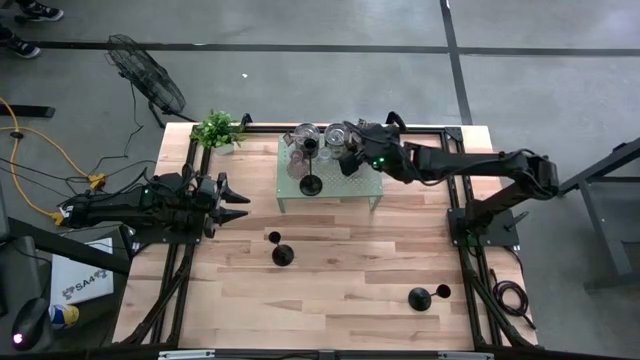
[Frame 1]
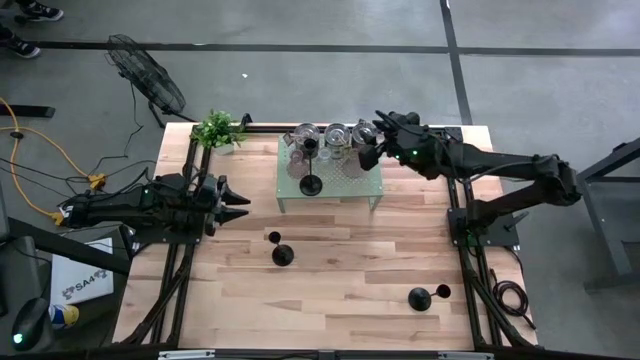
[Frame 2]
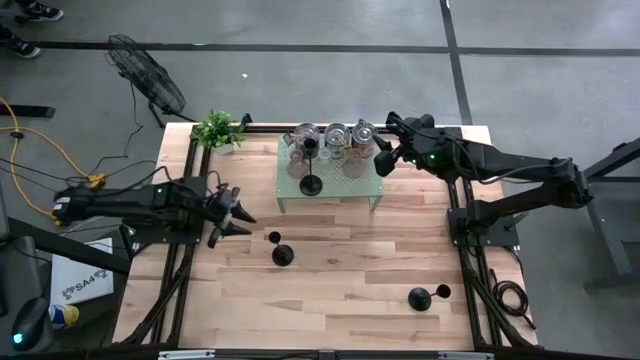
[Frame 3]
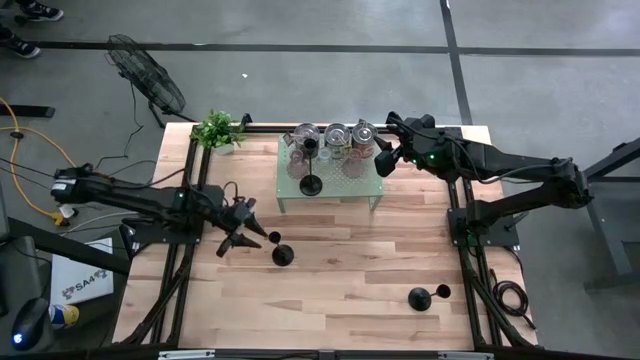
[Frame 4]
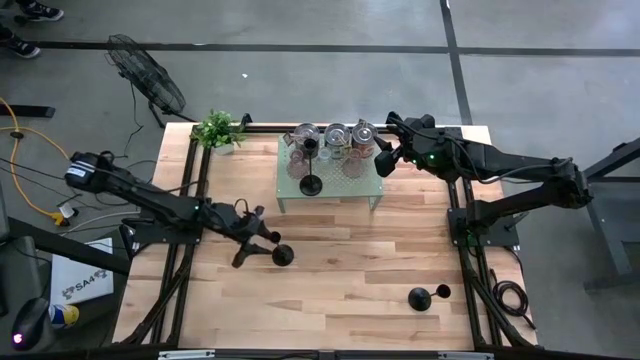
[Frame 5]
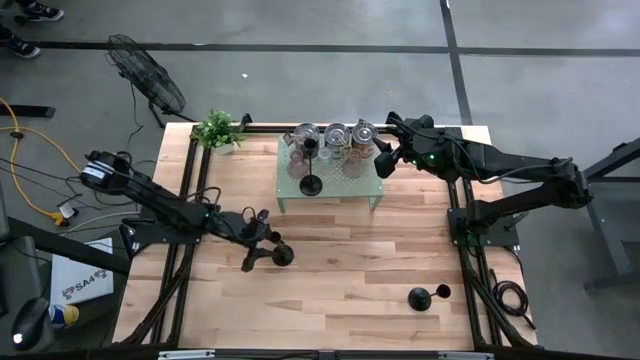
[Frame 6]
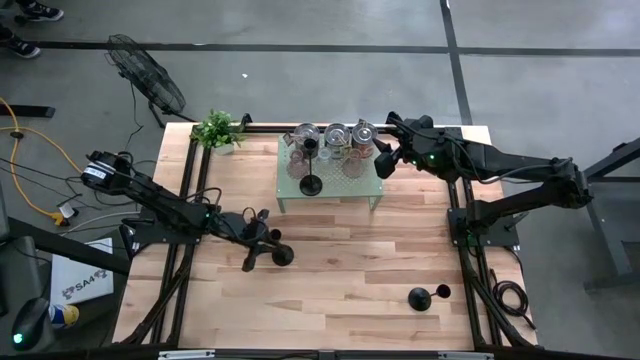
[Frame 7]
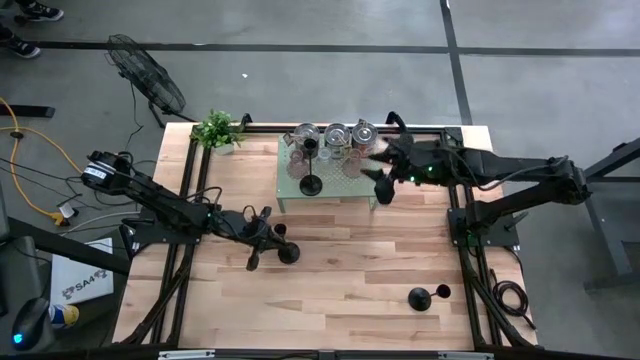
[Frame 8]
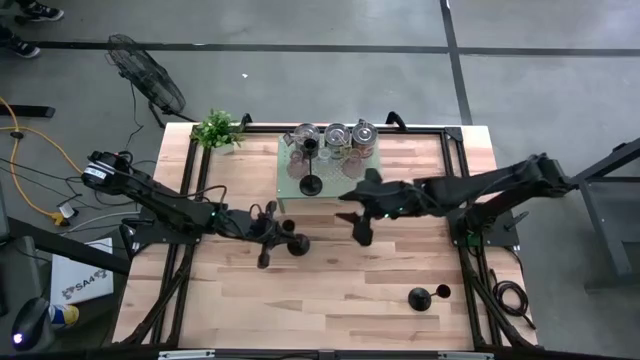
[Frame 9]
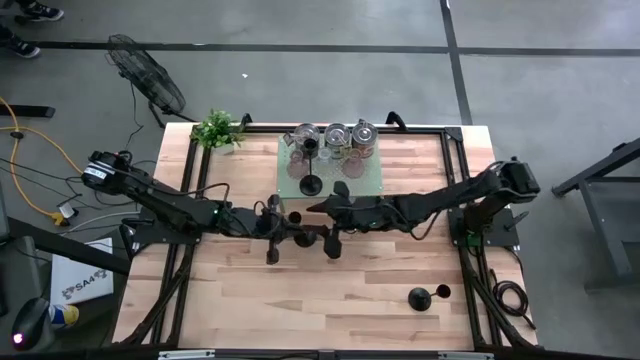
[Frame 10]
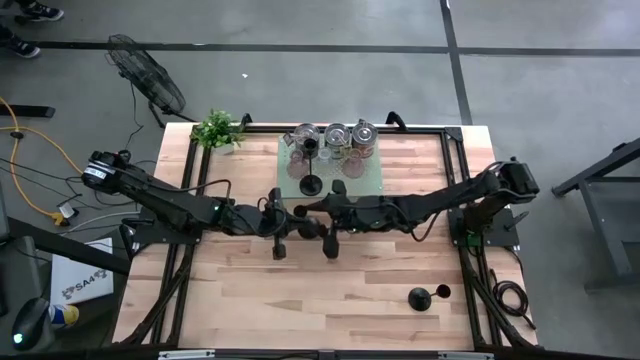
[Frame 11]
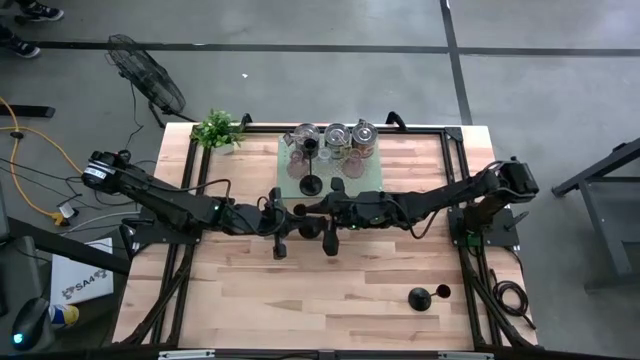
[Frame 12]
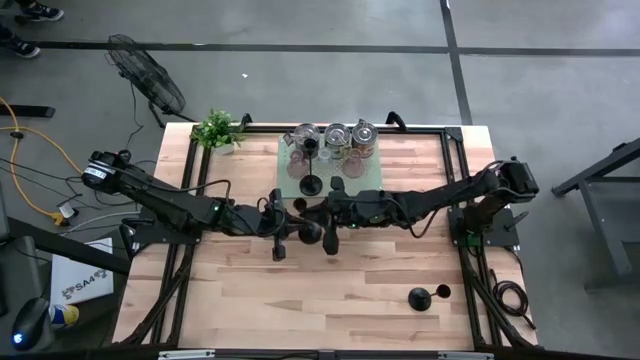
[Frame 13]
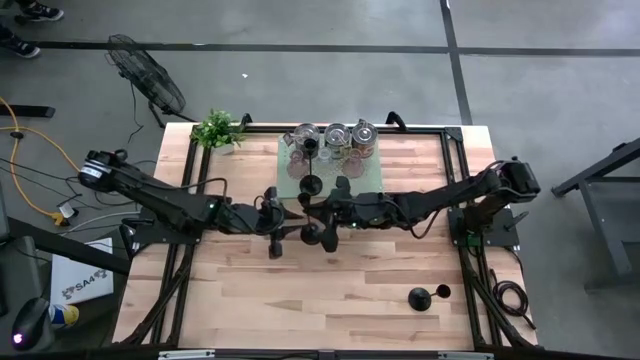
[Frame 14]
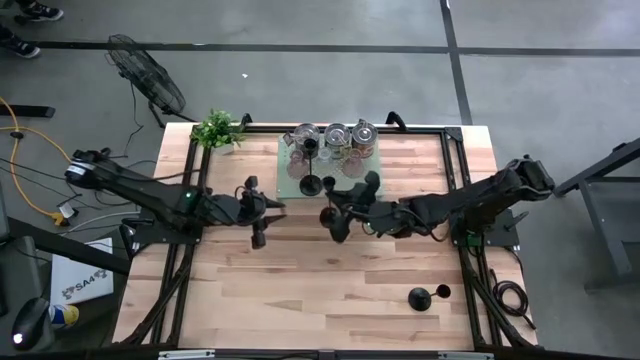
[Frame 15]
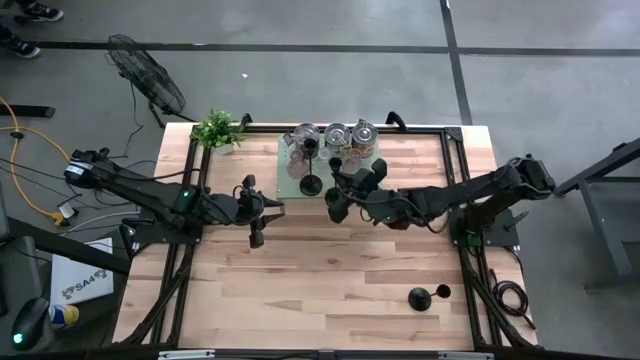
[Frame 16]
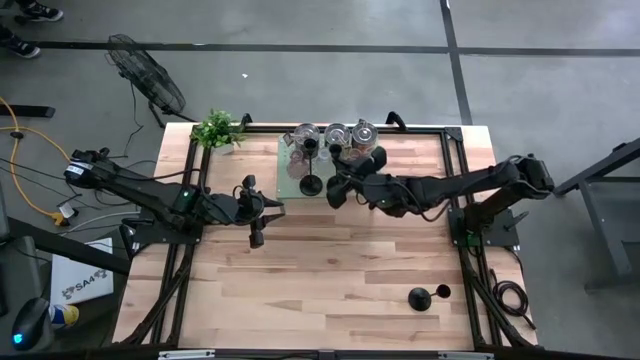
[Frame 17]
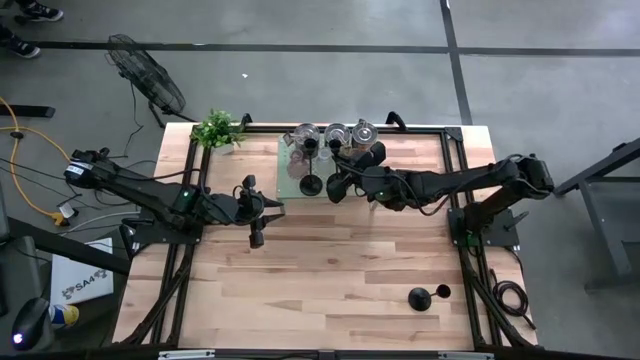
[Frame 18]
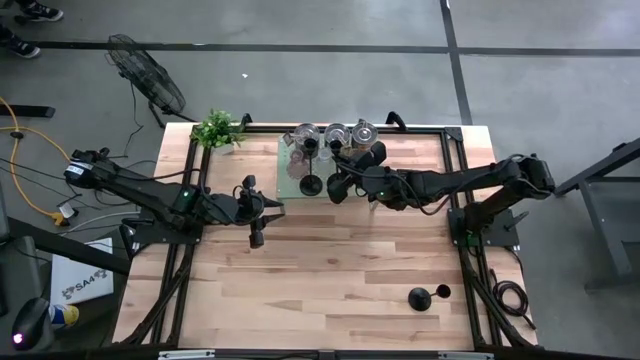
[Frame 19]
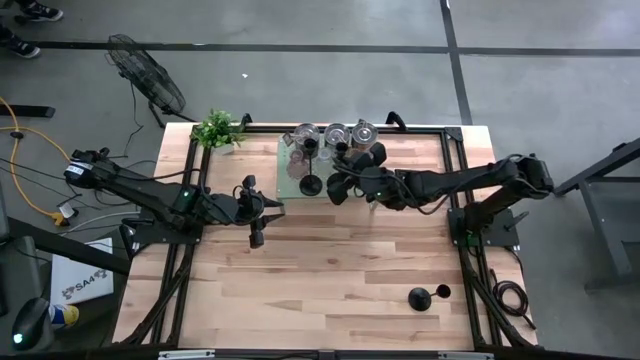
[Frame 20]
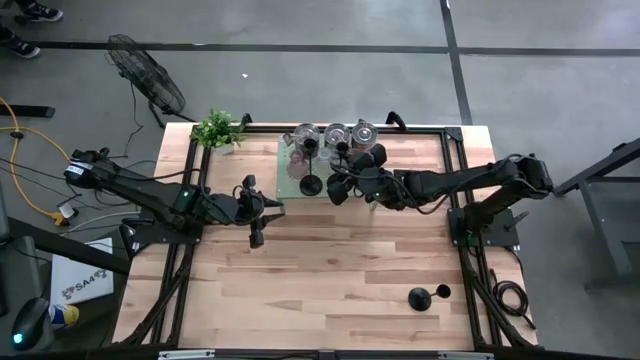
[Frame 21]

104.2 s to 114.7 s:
Task: Pick & Place candle stick holders
Put the top black candle holder on the shelf aligned with the other black candle holder

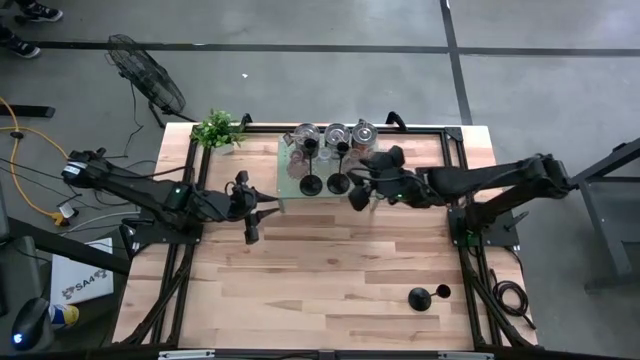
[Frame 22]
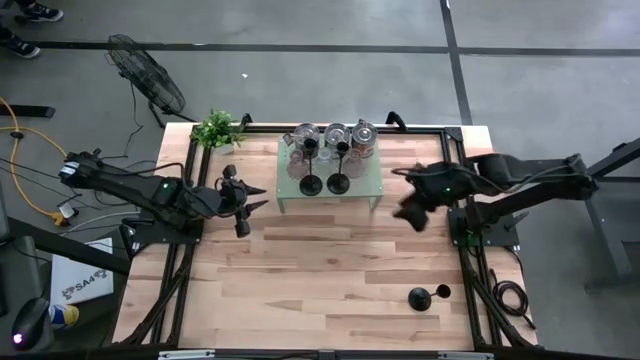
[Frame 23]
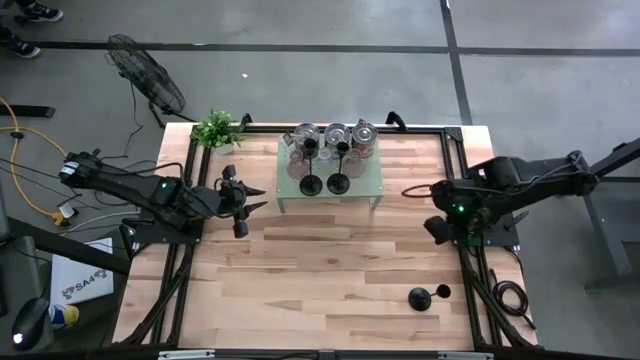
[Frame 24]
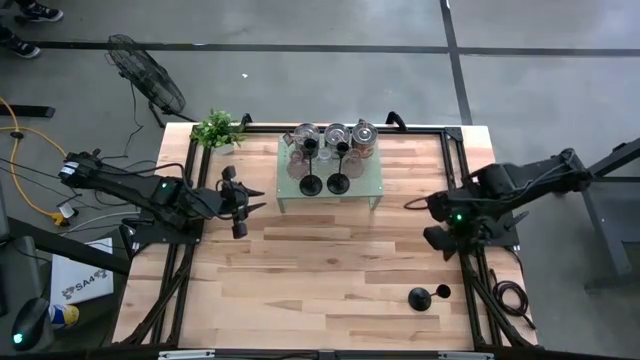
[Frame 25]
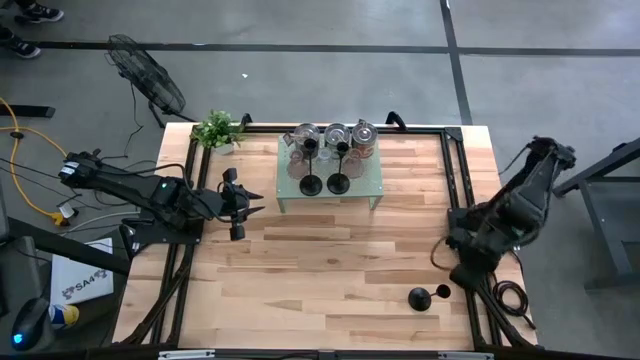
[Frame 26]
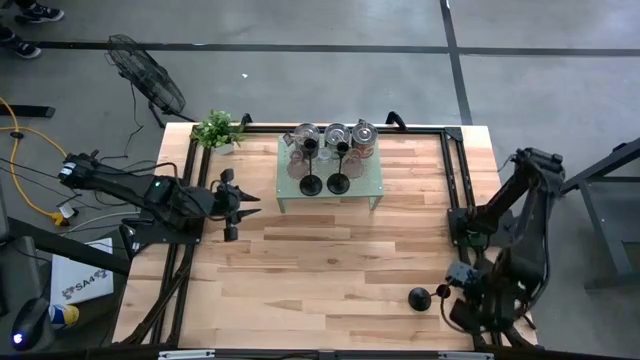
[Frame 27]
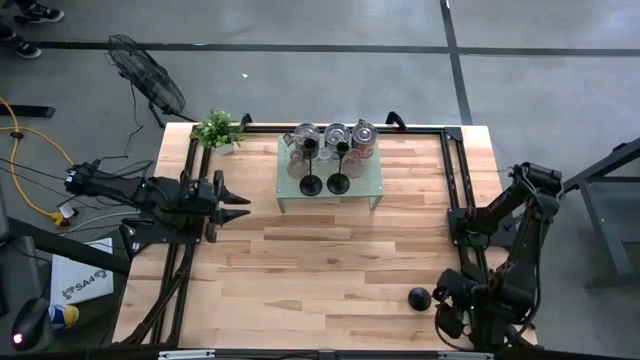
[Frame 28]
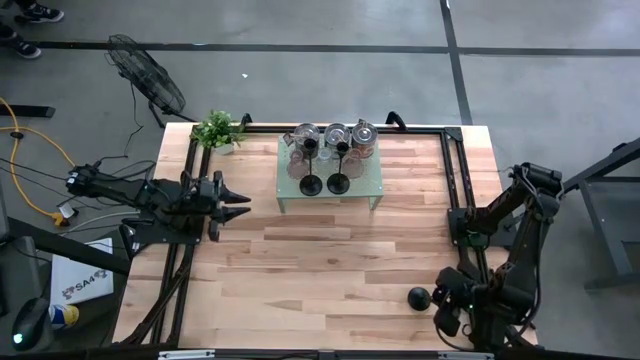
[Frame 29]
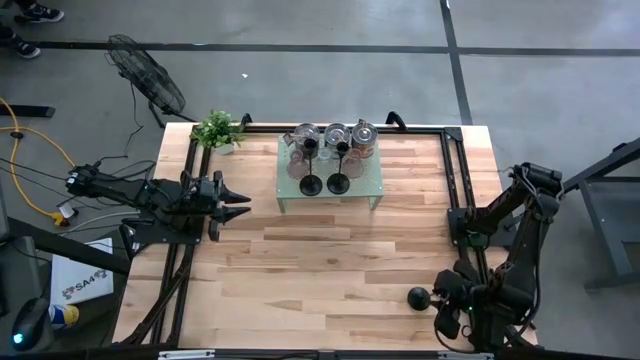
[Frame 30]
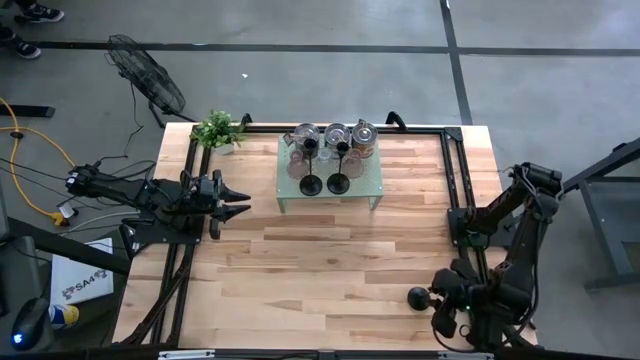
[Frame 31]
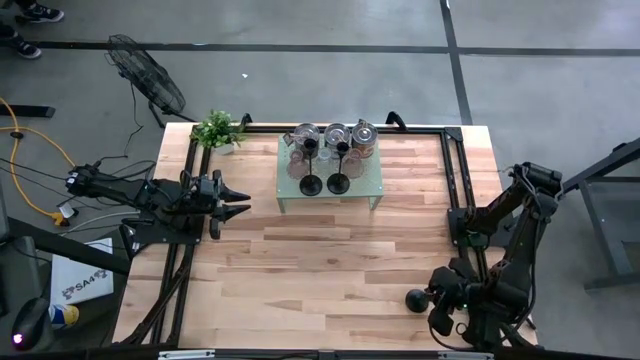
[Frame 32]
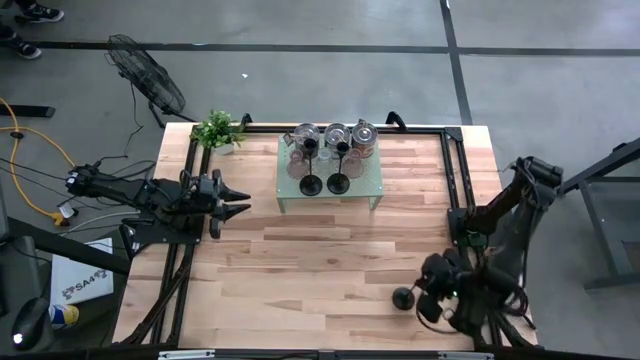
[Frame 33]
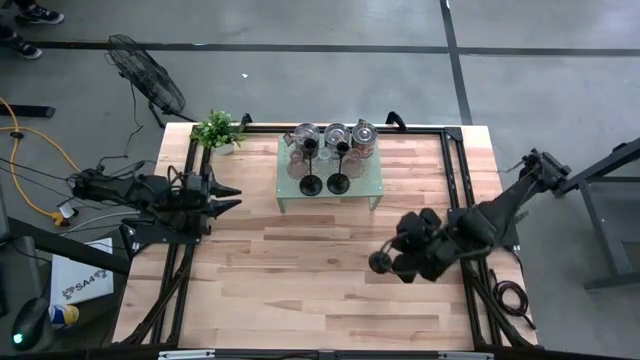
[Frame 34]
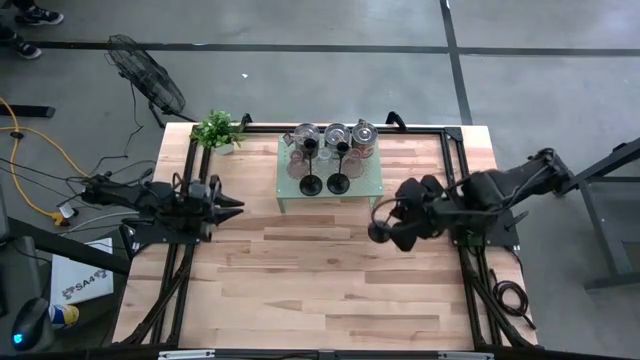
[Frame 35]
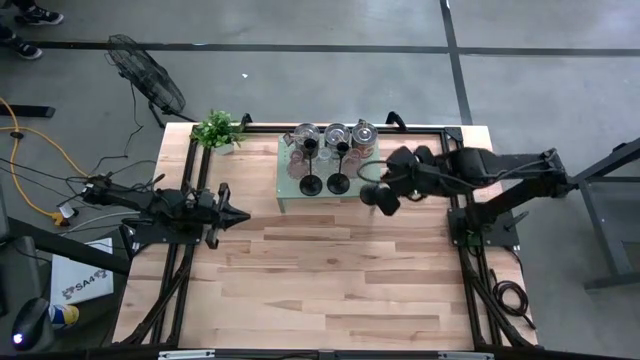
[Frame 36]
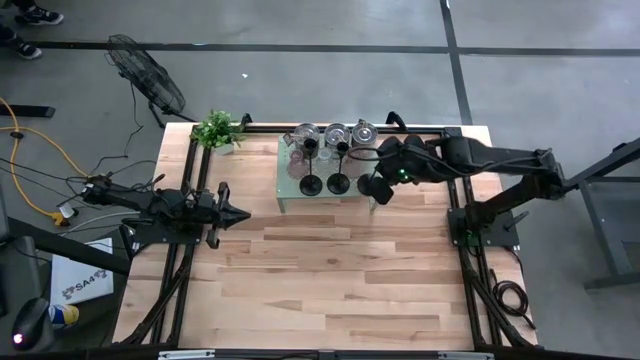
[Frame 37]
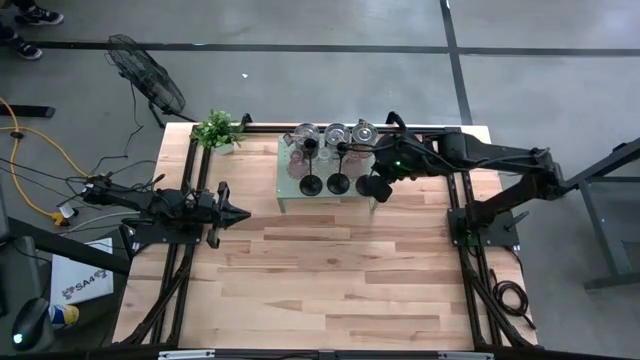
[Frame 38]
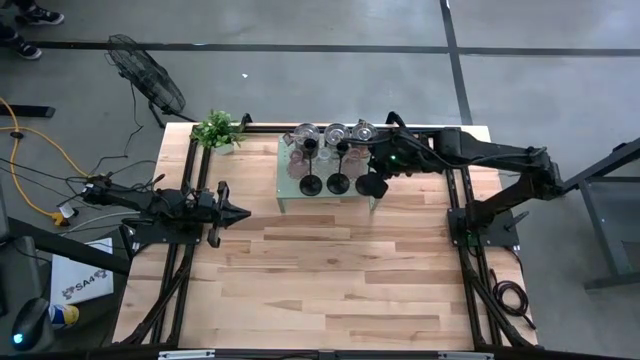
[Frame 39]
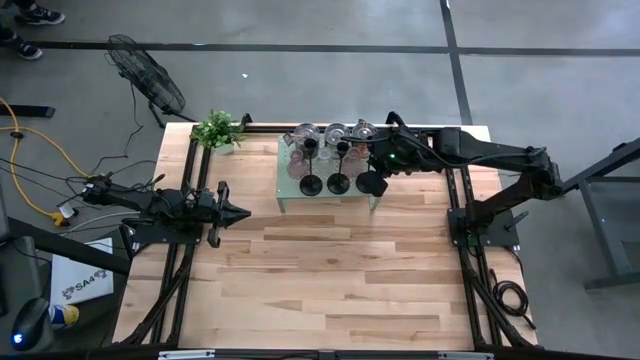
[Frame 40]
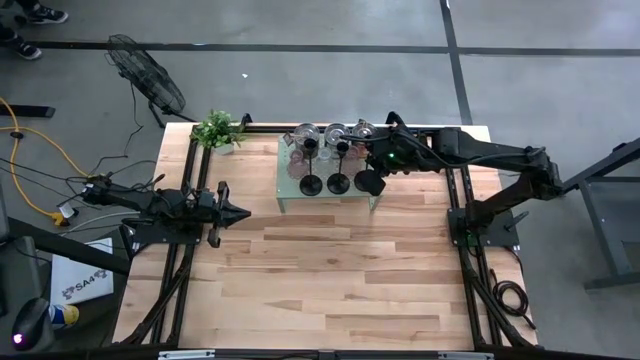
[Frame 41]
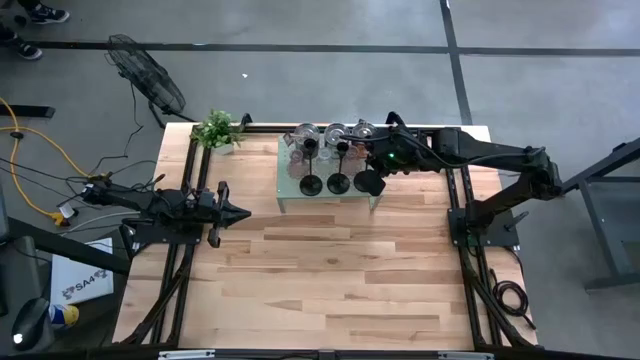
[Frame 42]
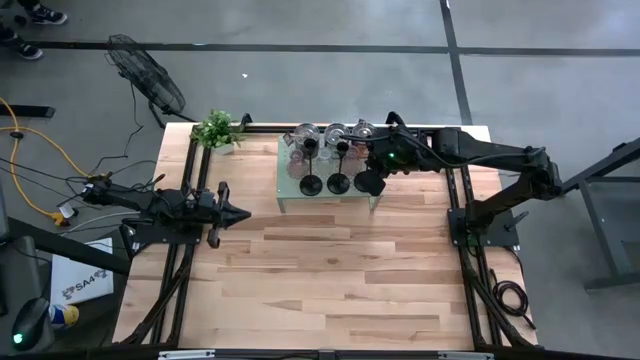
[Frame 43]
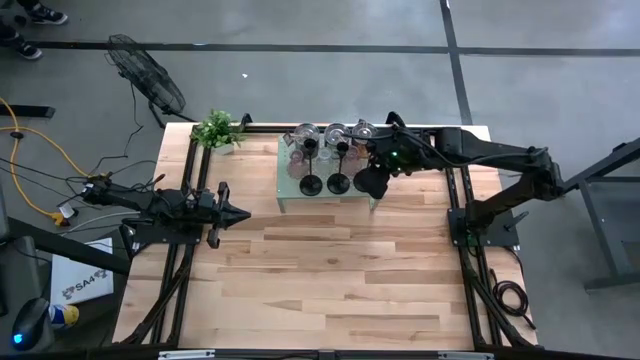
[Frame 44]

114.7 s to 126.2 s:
Put the black candle holder on the shelf aligned with the other black candle holders
